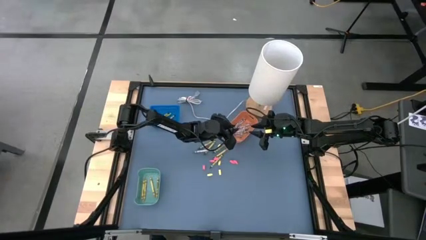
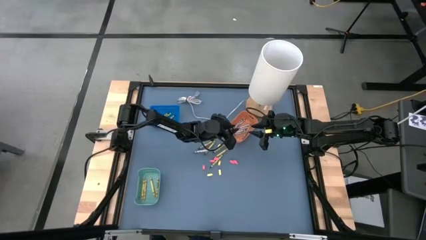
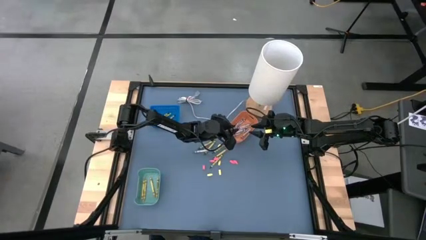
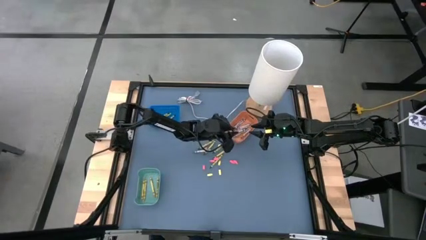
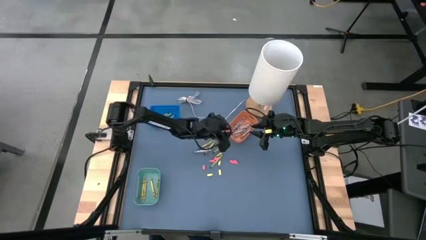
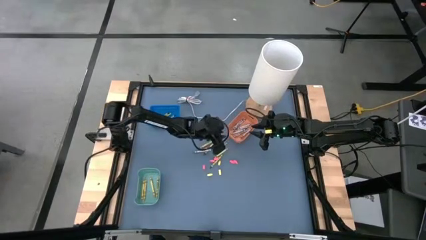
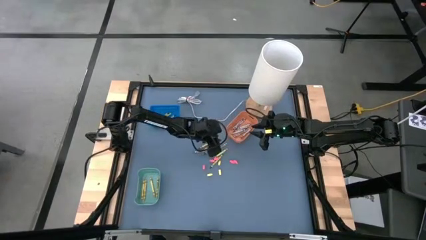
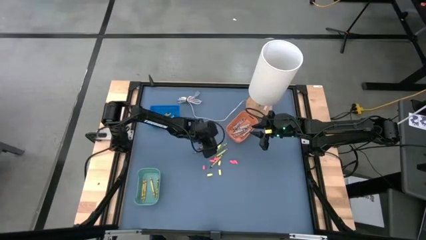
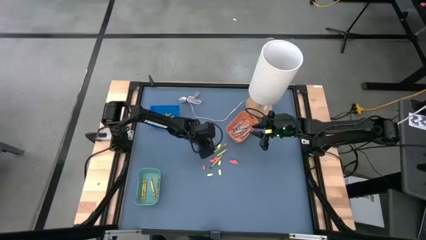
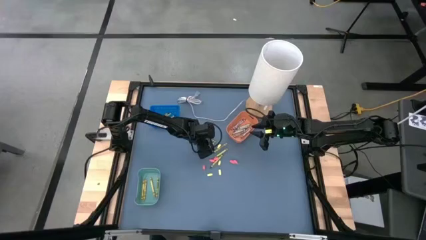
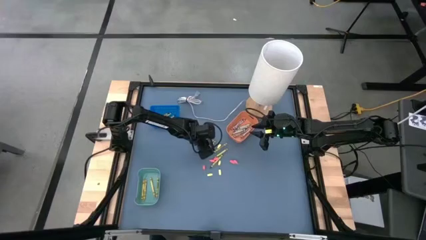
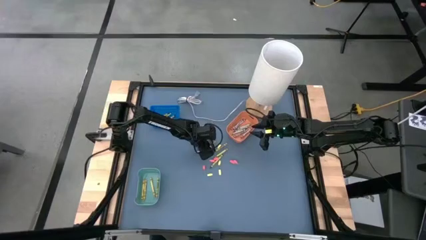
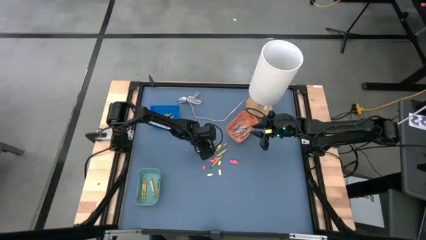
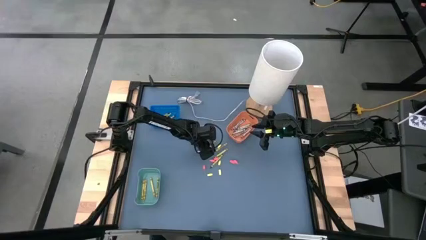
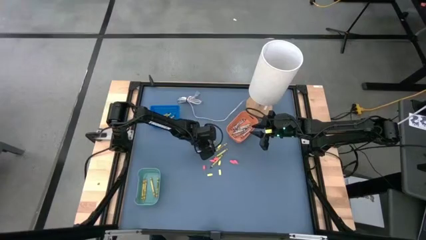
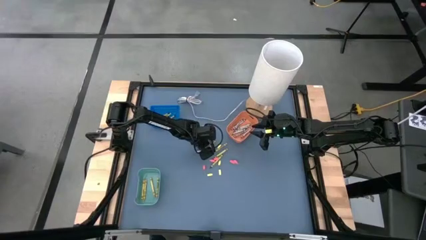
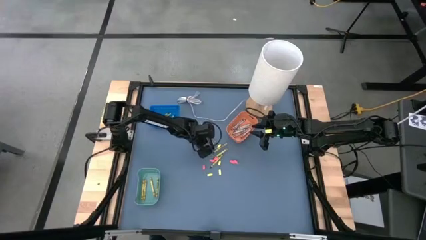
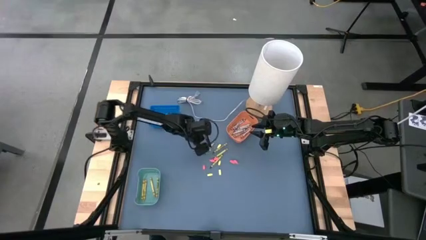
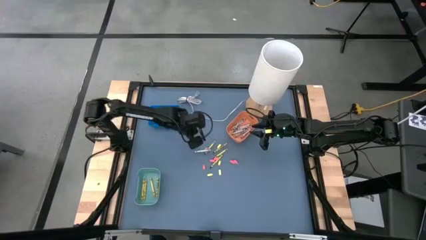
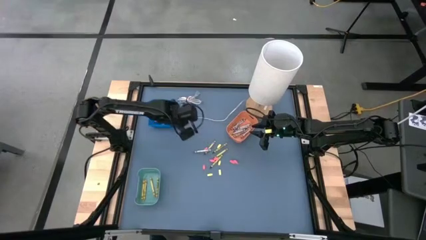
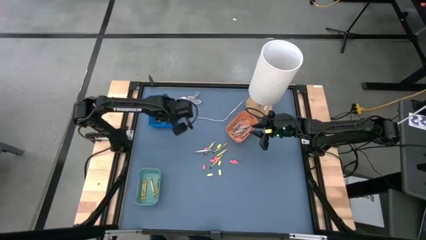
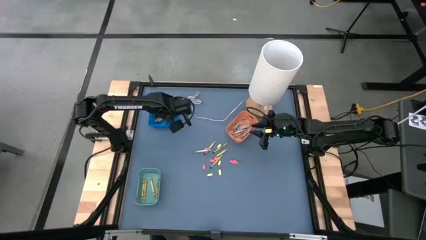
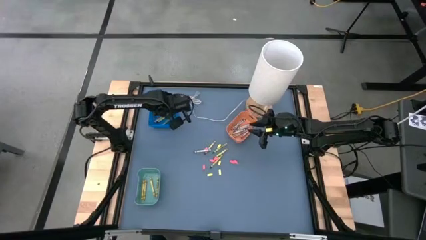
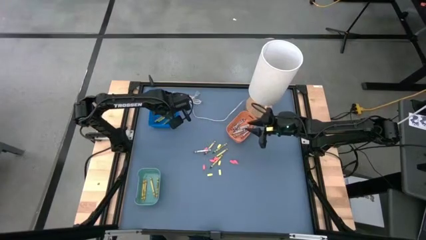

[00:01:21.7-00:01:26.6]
Task: Sort crayons
Put the green crayon into the blue bin

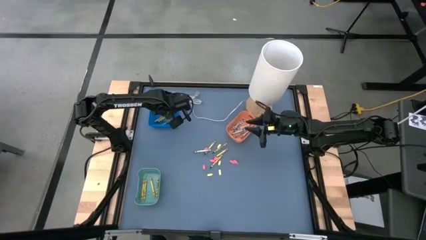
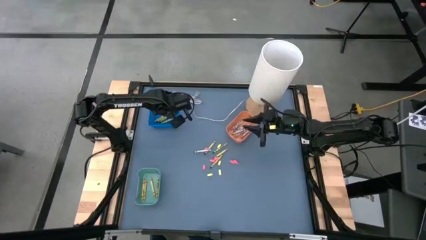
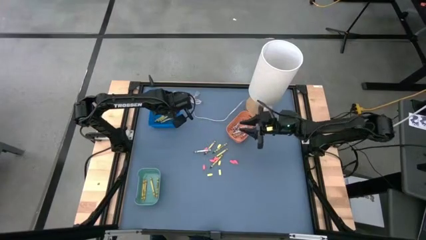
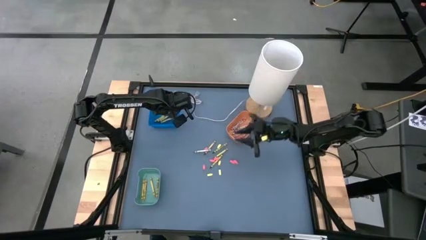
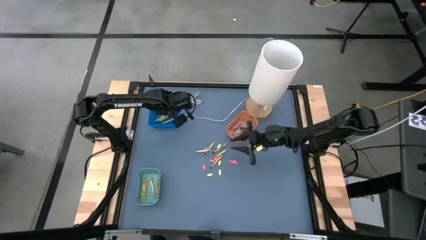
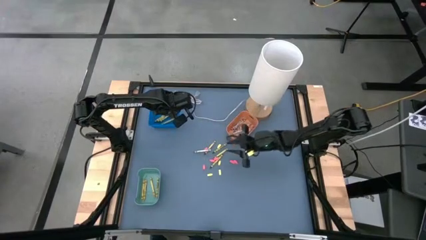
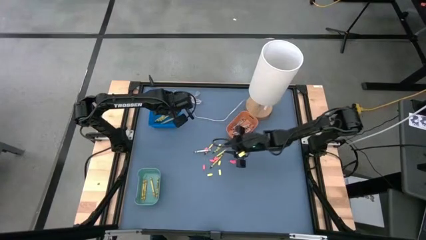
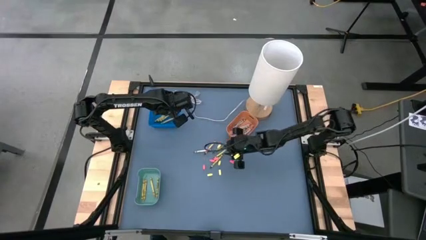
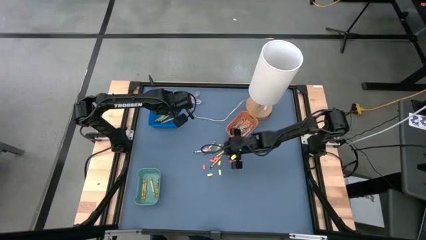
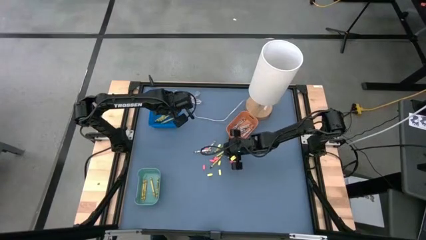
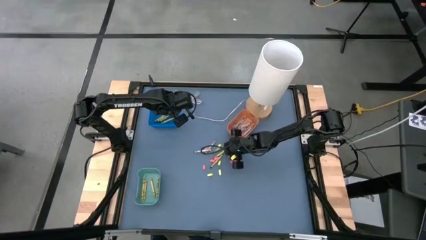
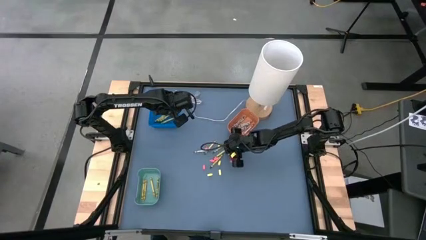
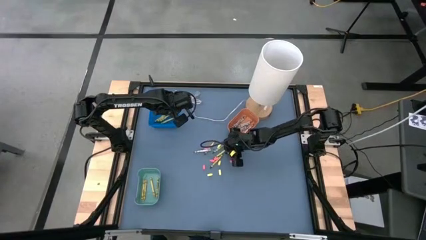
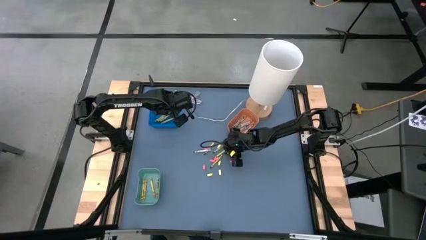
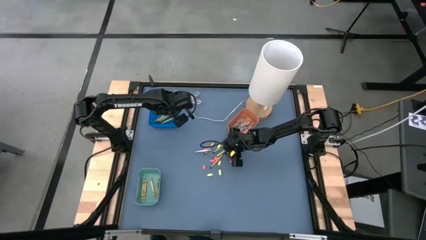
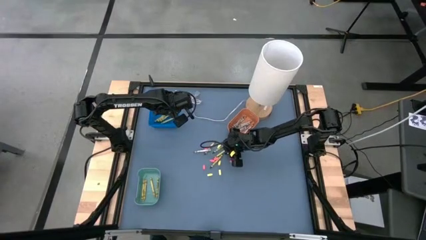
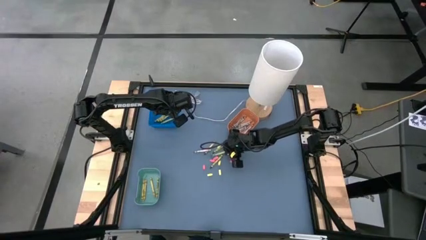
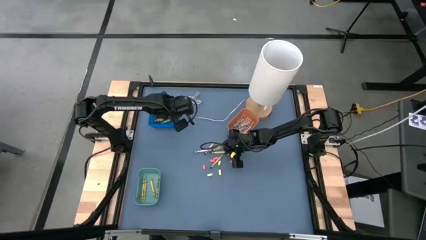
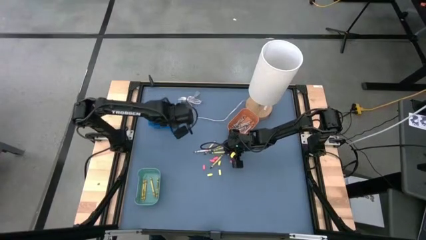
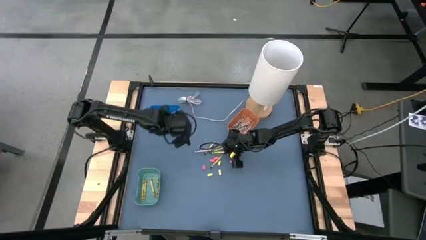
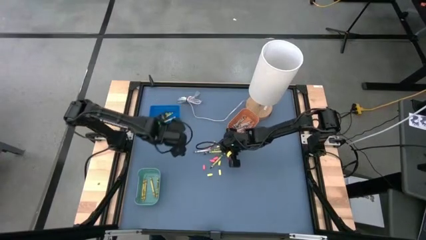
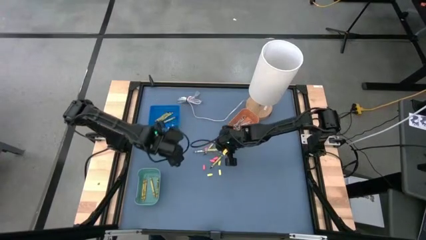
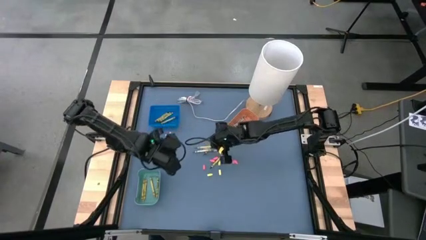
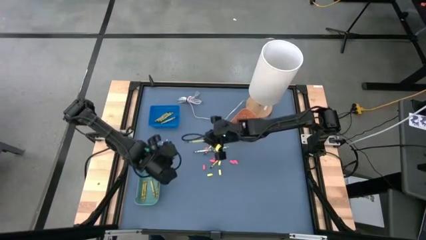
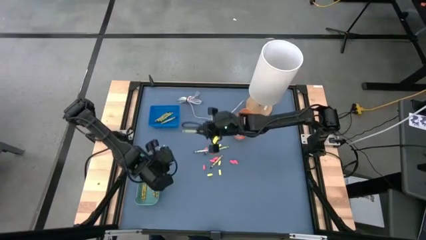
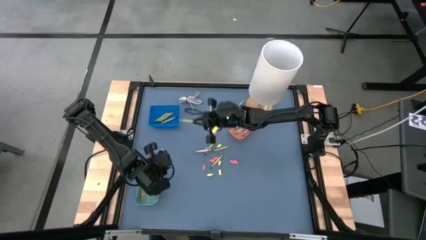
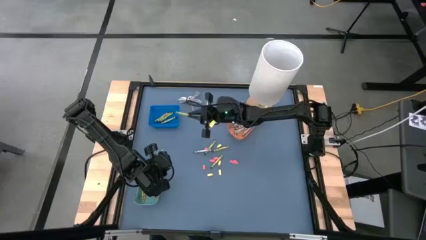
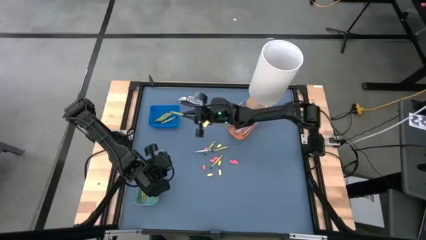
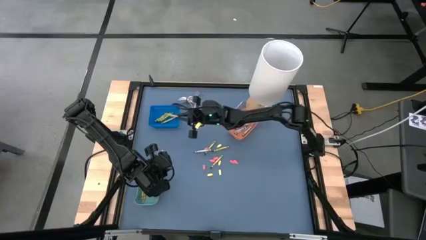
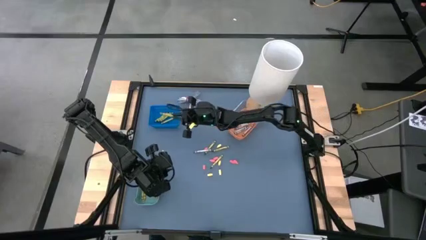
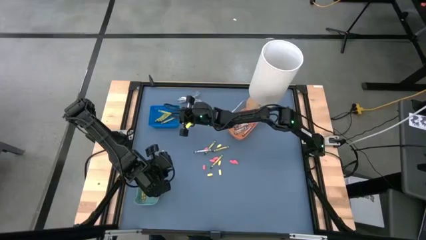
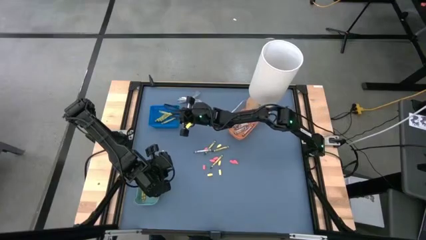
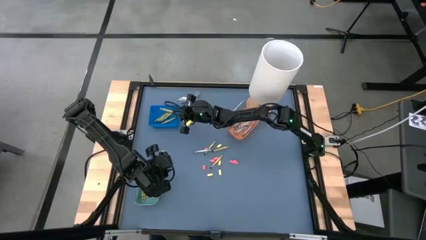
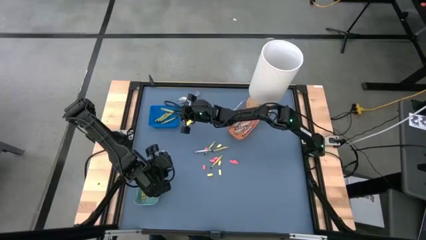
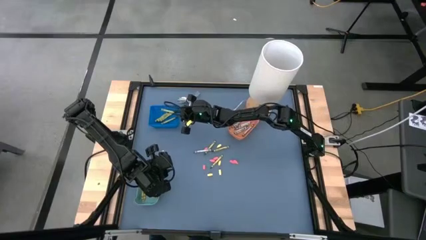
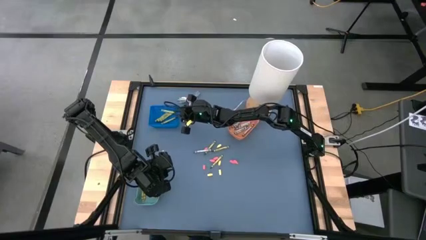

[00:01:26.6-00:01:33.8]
Put the green crayon into the blue bin

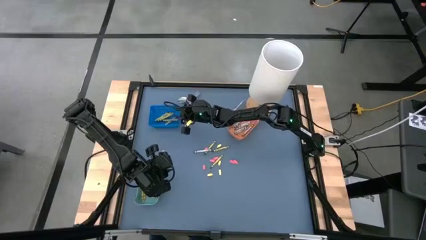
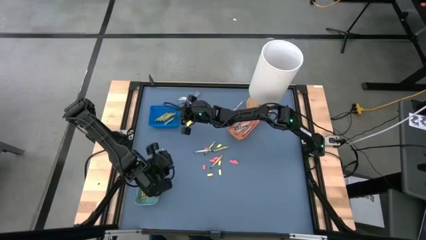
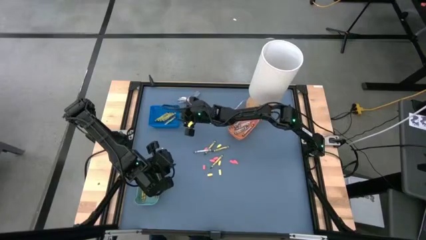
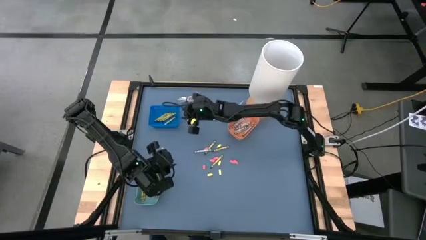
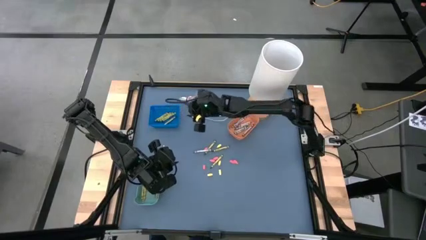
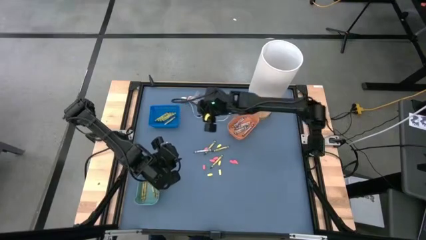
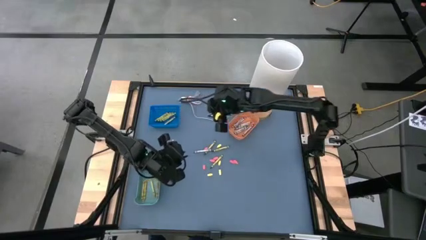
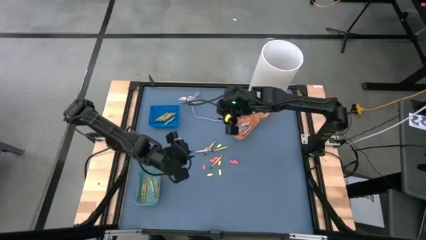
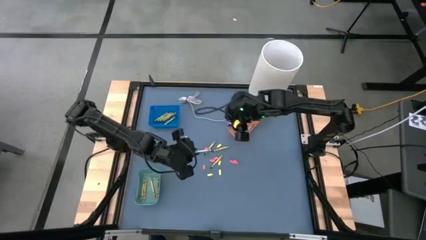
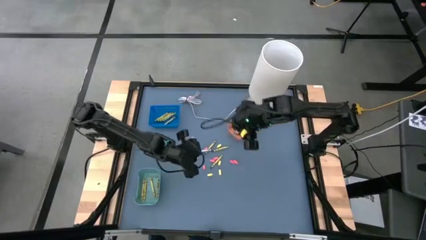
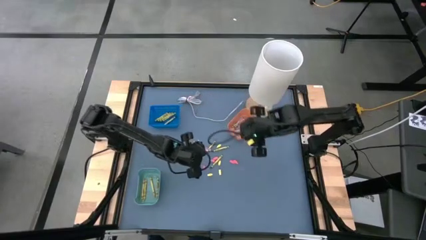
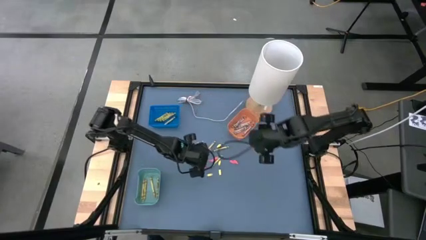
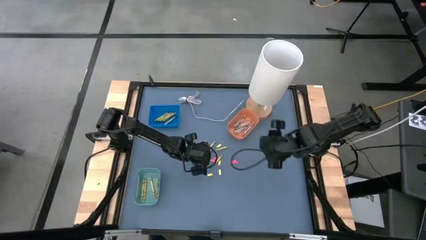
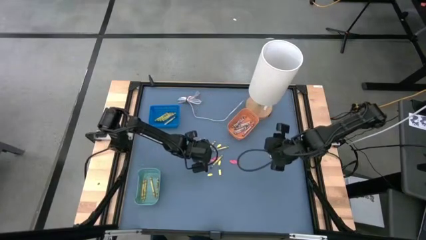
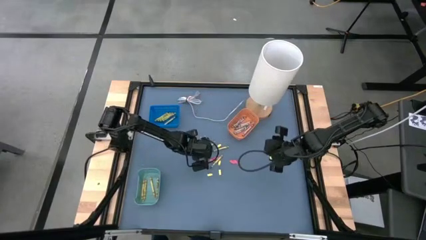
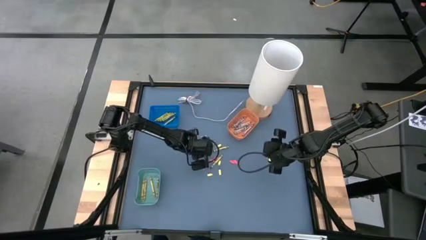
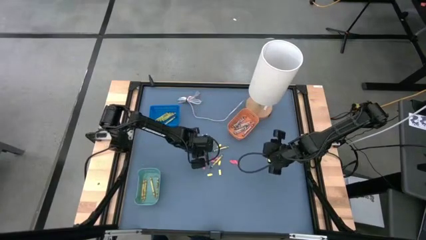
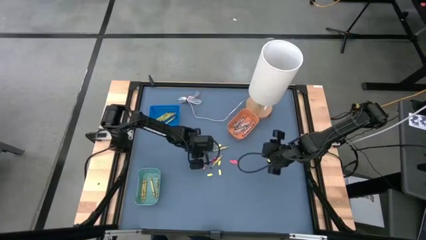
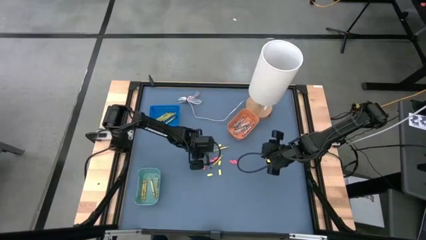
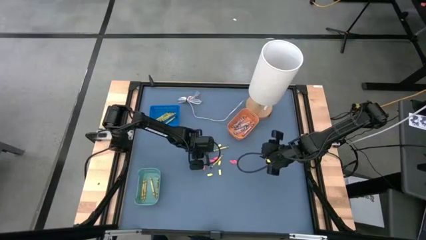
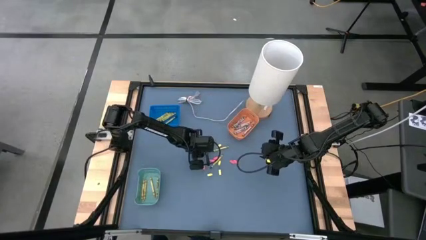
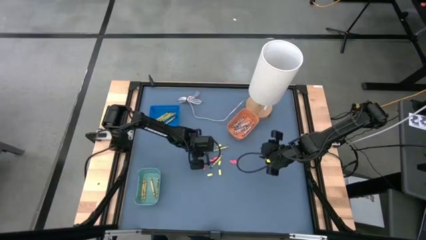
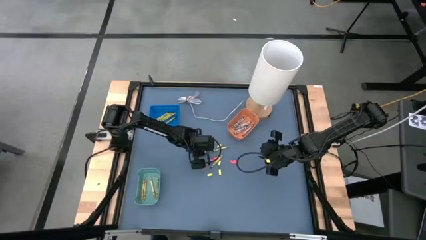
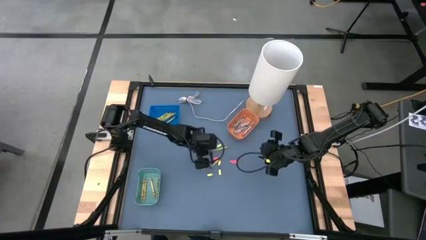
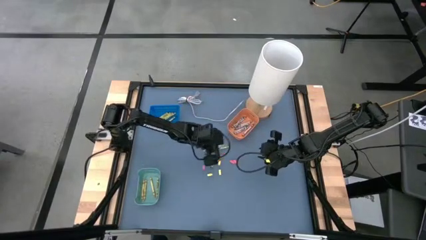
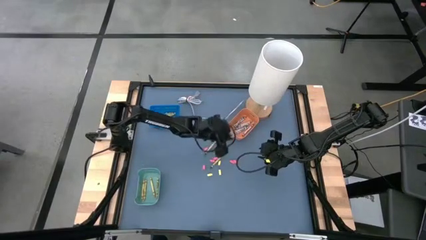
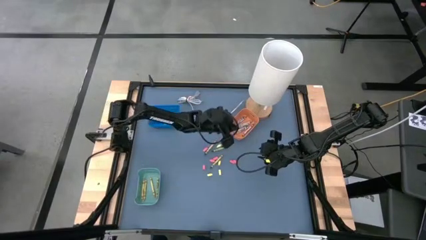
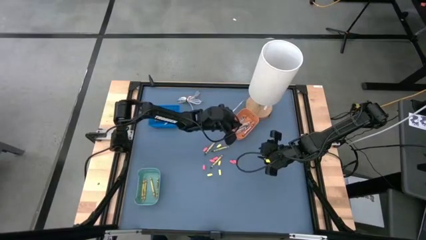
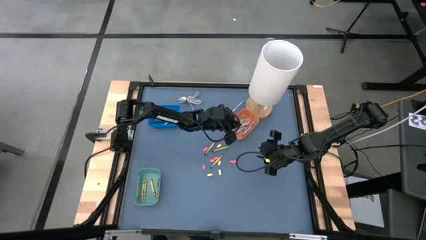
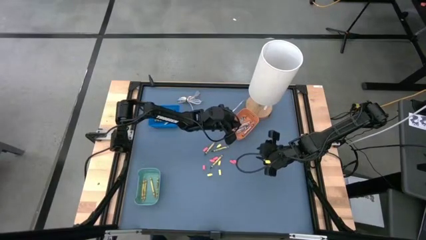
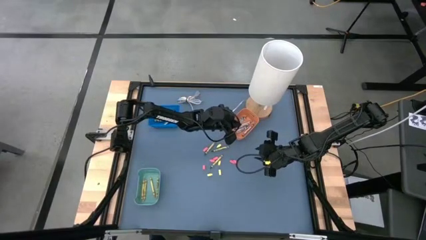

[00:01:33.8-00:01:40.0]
Put the gray crayon into the orange bin
